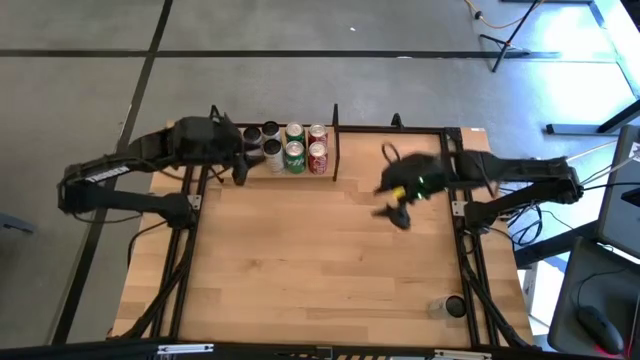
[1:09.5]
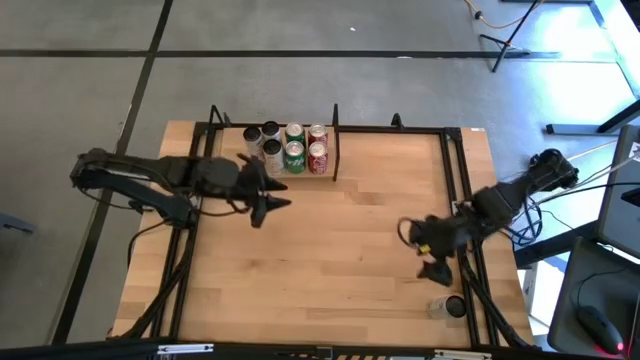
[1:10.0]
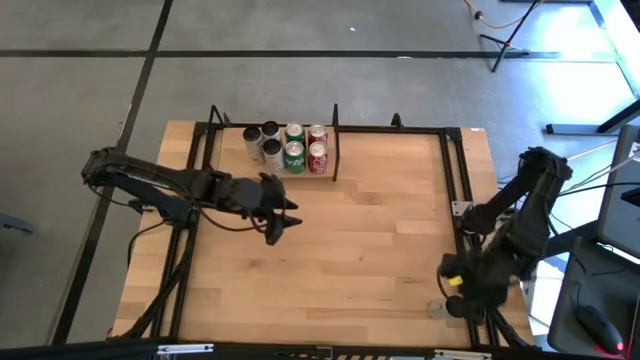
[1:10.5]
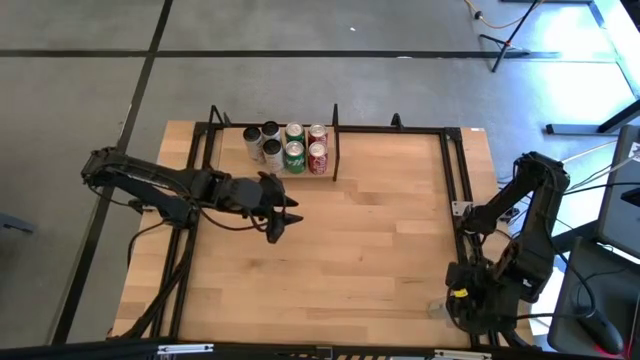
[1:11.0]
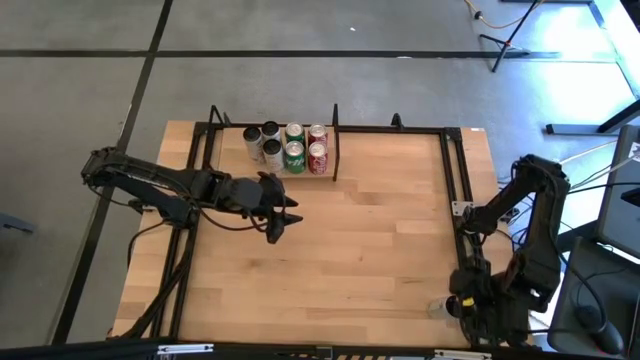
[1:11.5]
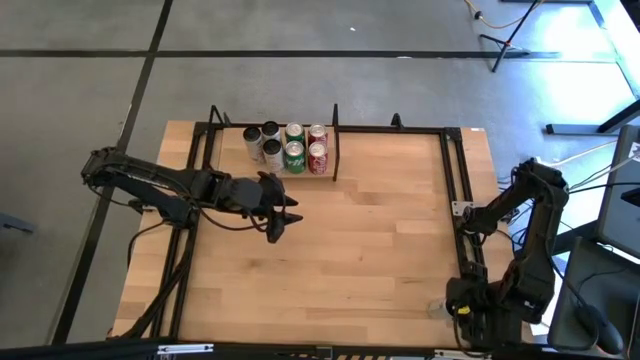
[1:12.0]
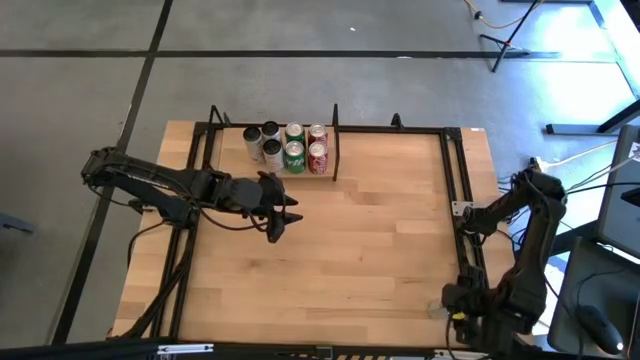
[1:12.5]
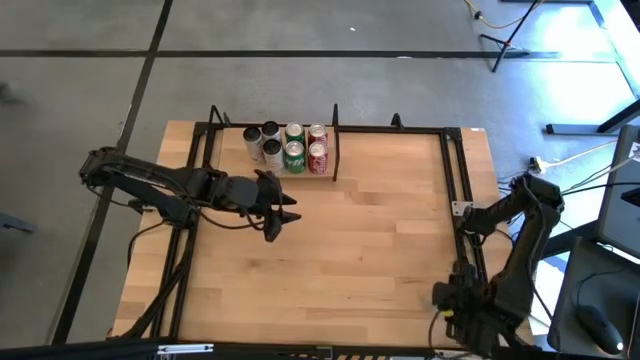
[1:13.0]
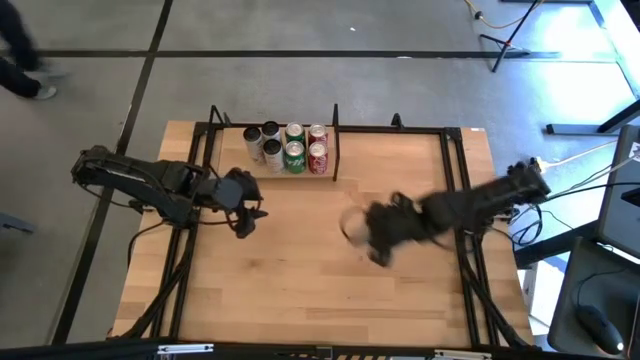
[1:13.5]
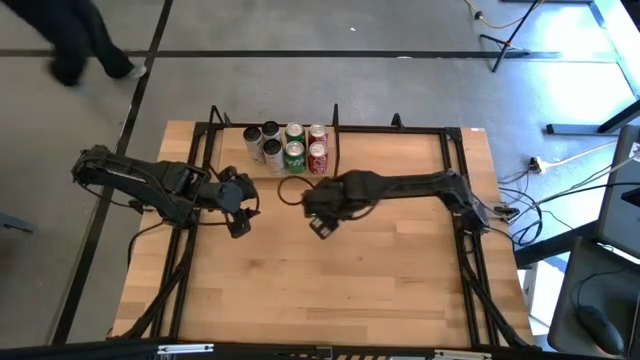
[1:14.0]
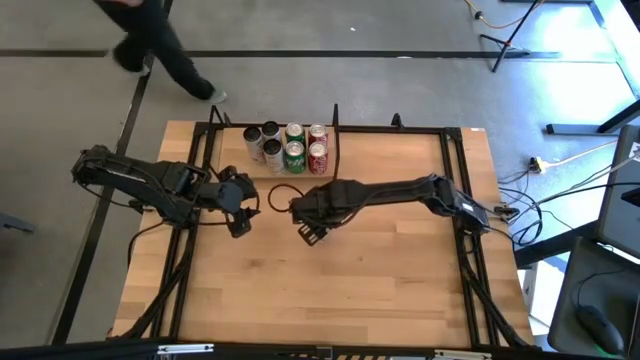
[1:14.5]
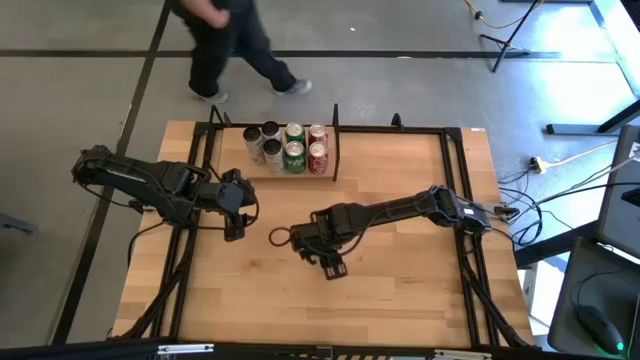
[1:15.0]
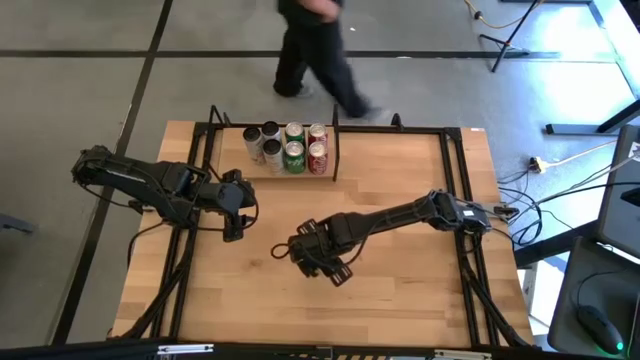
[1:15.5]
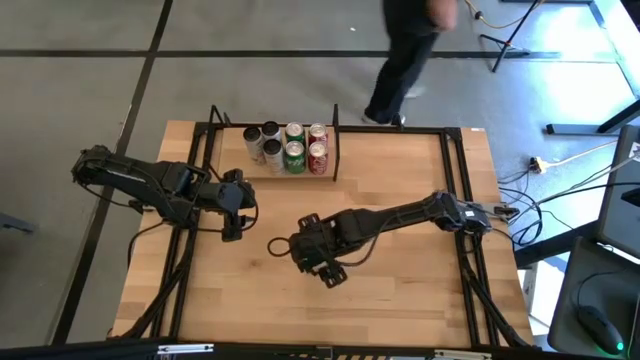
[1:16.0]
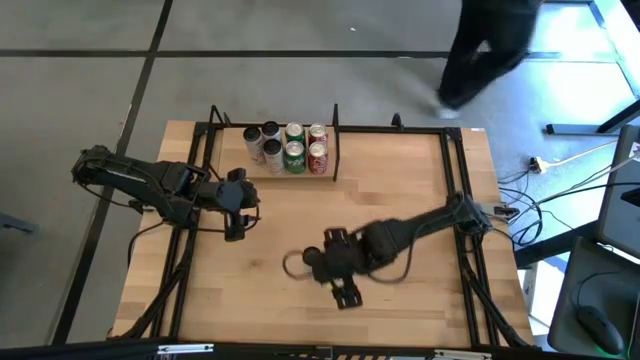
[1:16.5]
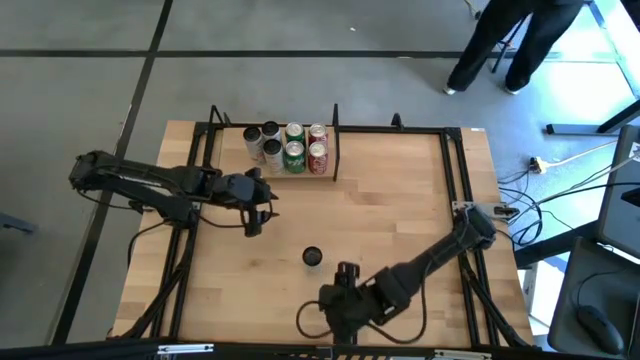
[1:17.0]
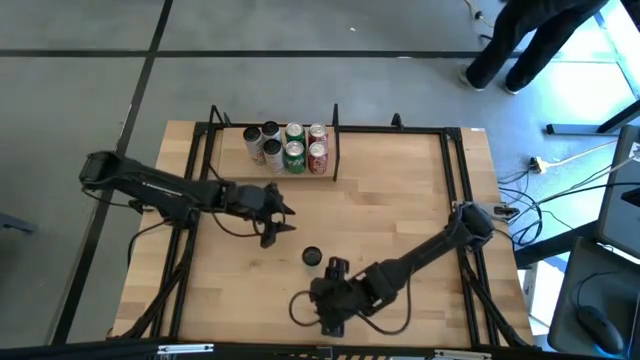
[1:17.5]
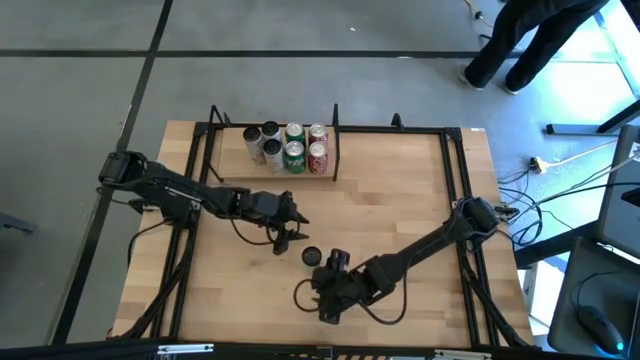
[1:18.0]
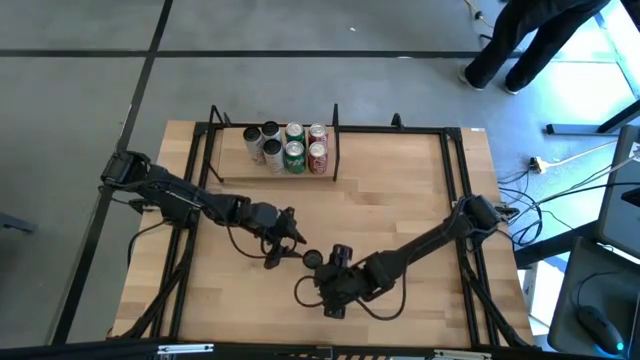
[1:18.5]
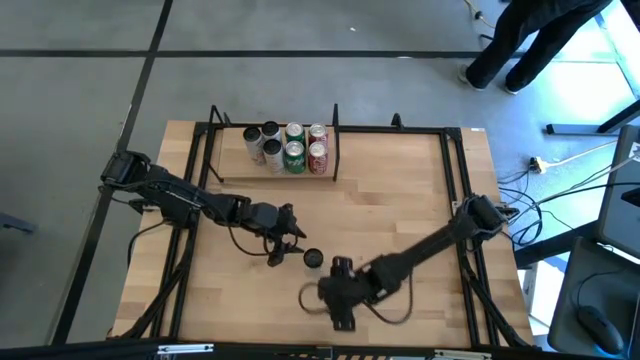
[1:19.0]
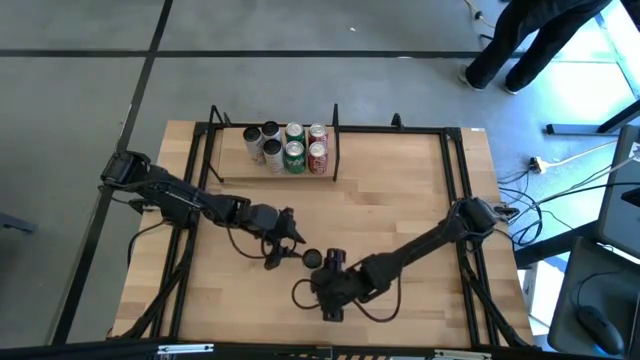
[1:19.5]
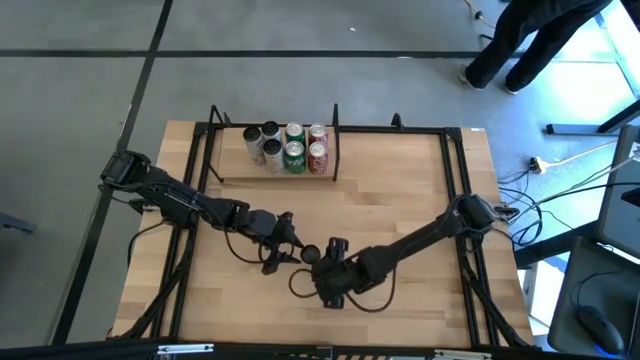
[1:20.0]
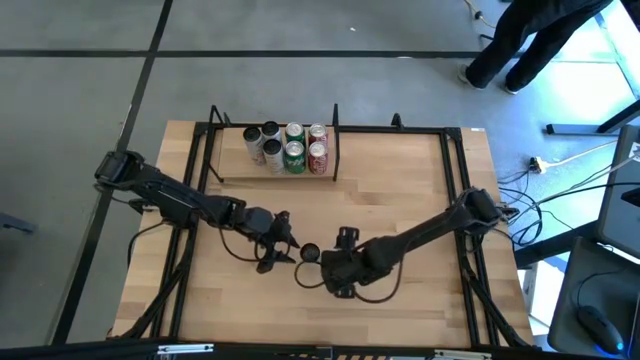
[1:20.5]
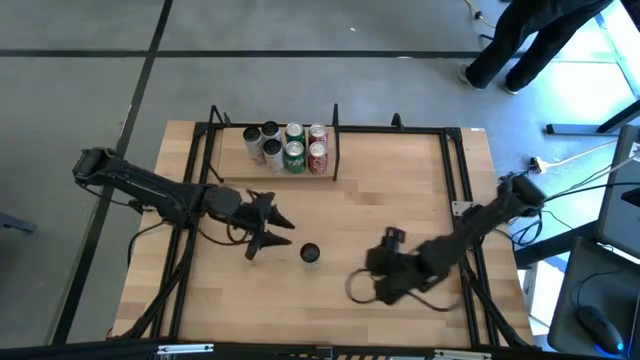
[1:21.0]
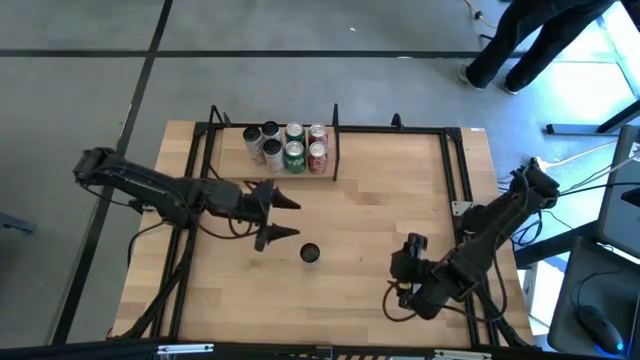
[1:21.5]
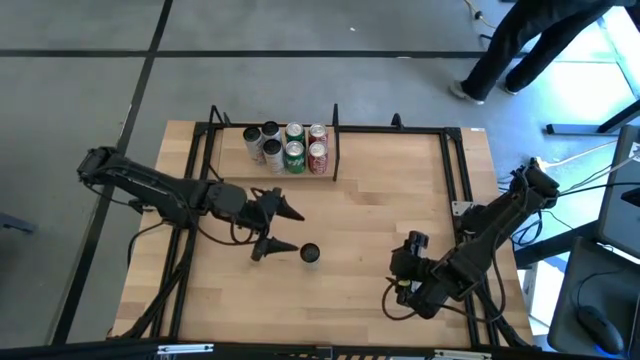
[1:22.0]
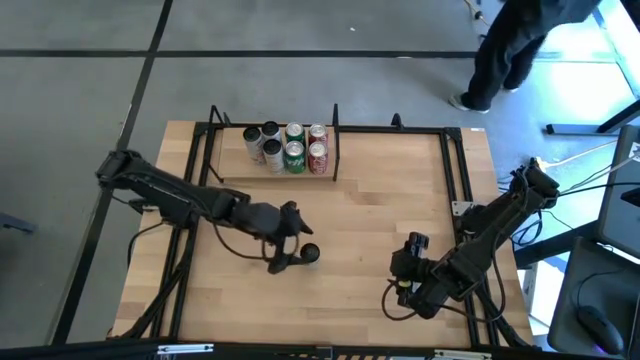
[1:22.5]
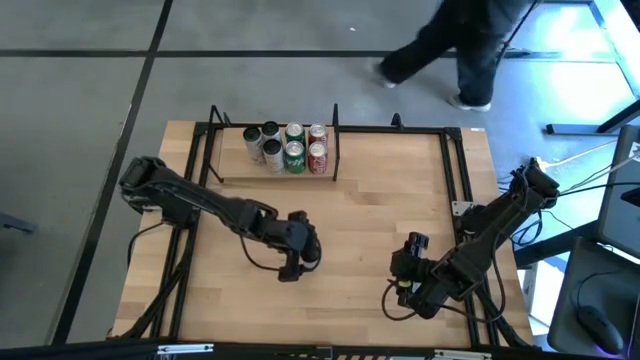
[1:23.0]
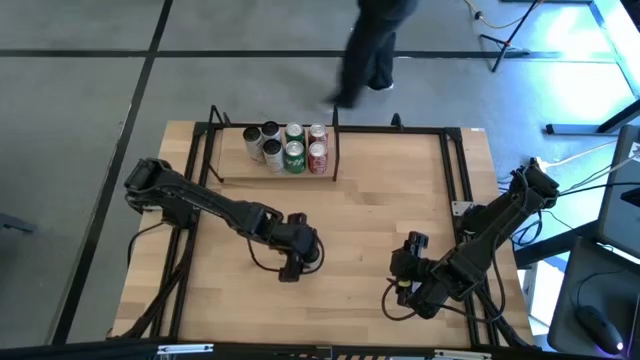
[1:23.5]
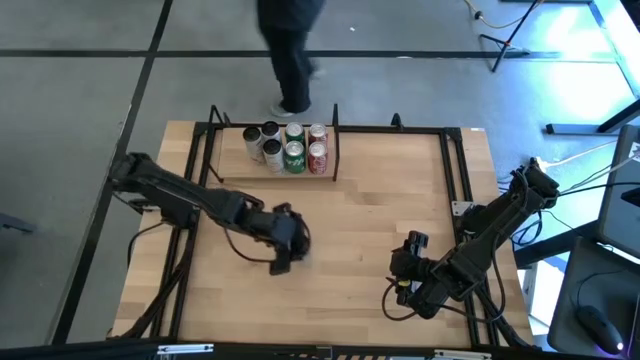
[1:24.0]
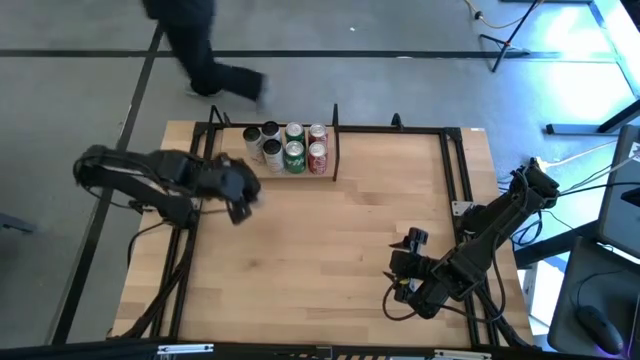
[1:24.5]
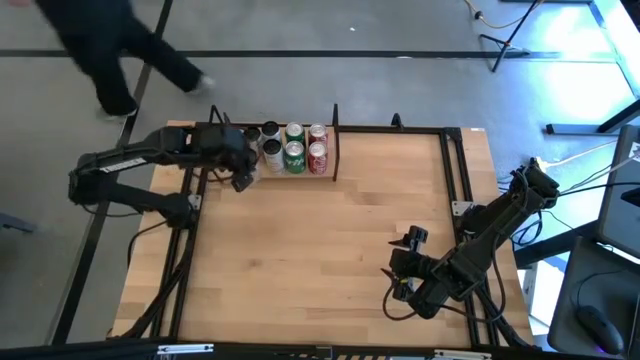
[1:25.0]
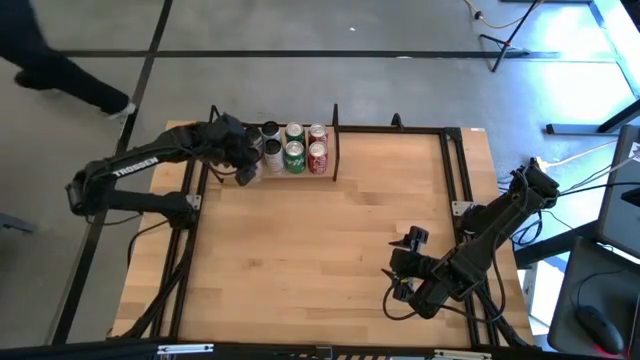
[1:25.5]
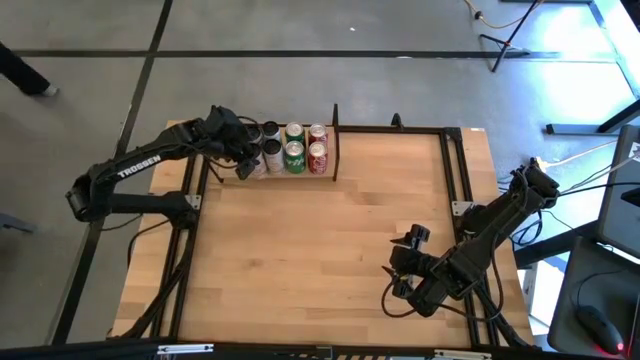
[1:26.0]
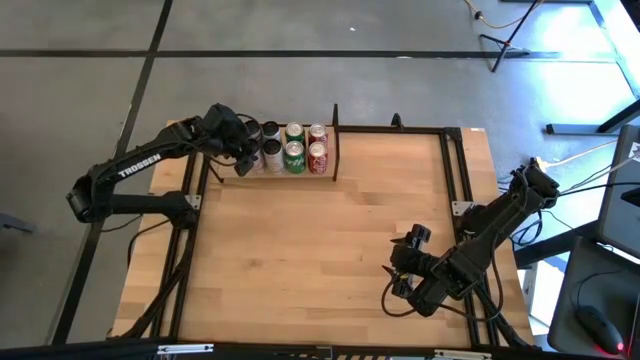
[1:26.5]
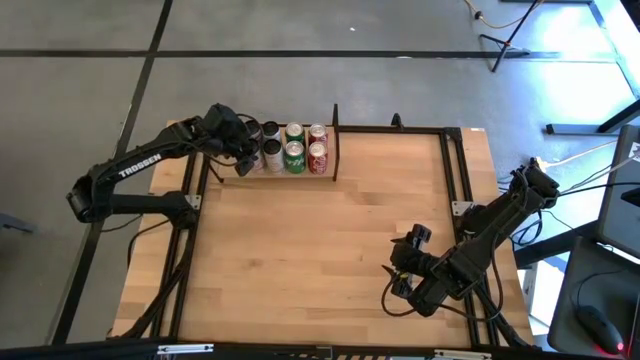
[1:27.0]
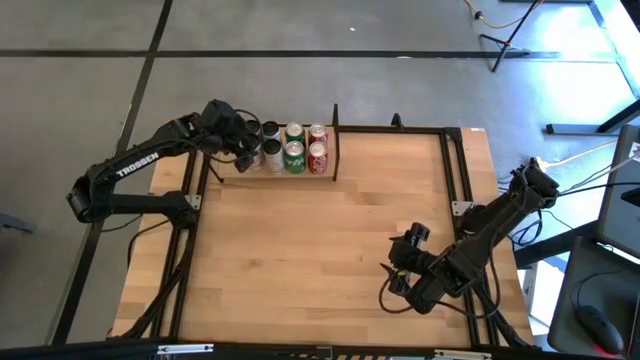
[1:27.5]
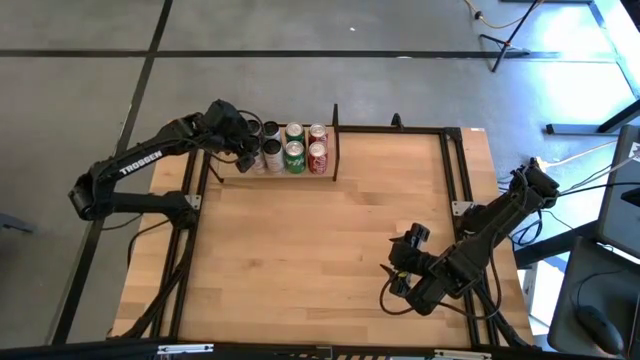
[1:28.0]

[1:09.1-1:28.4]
Task: Place canned beverage on shelf
Put the white-pink soda can on the shelf aligned with the other white-pink soda can

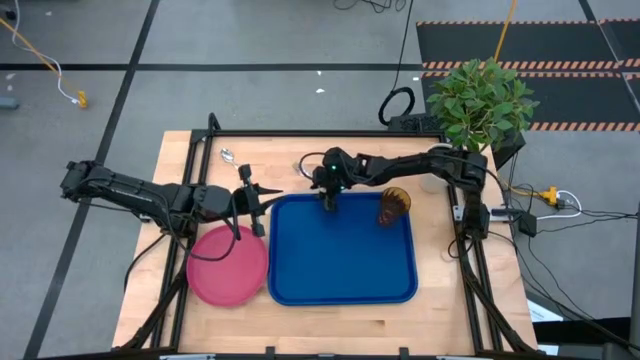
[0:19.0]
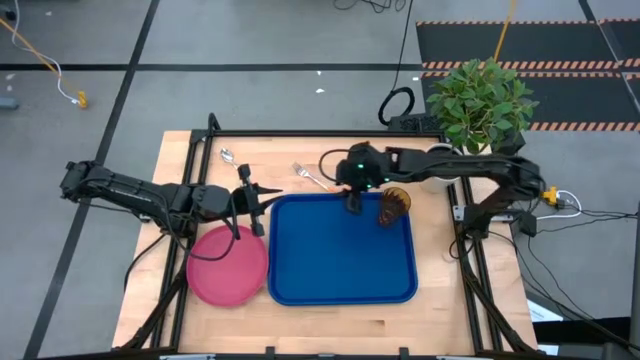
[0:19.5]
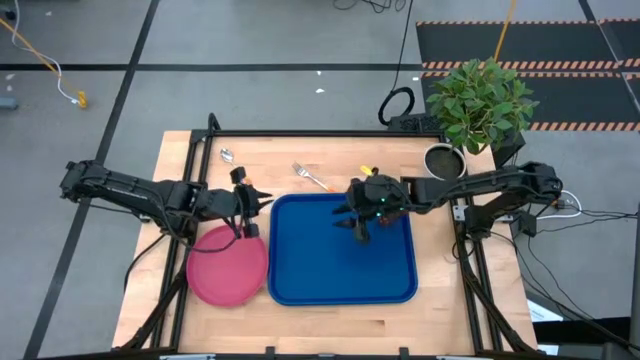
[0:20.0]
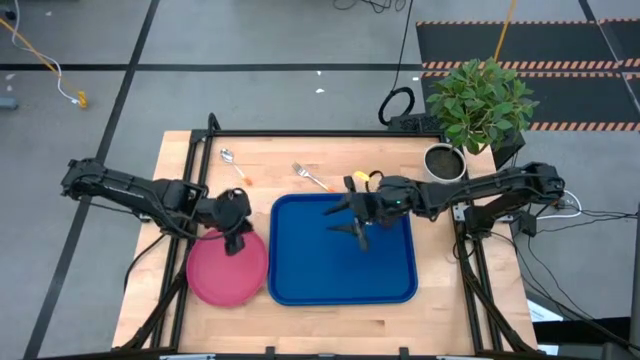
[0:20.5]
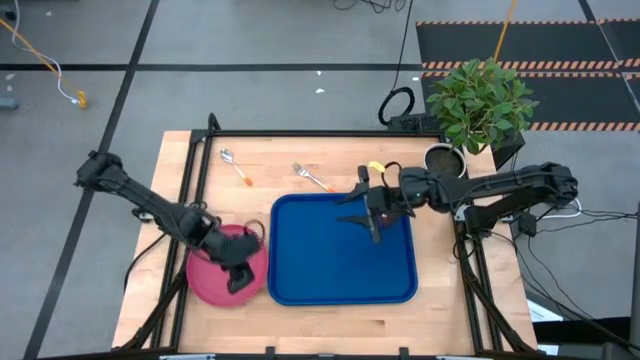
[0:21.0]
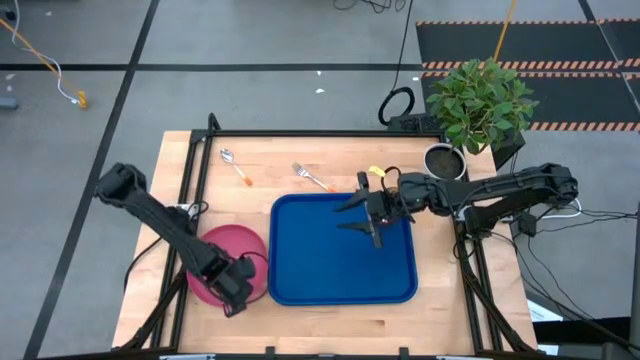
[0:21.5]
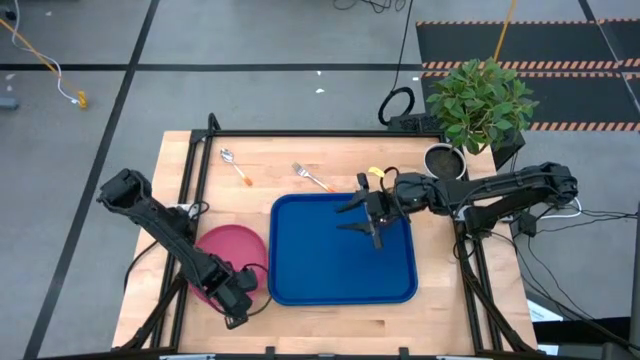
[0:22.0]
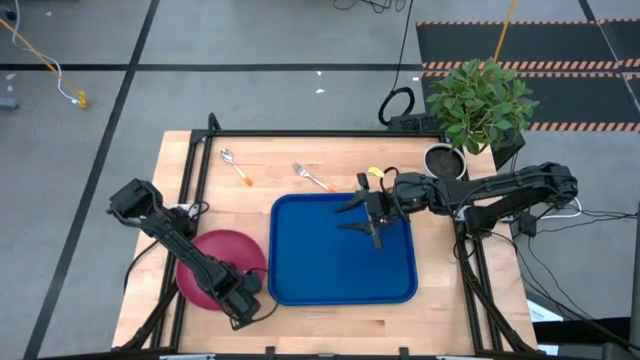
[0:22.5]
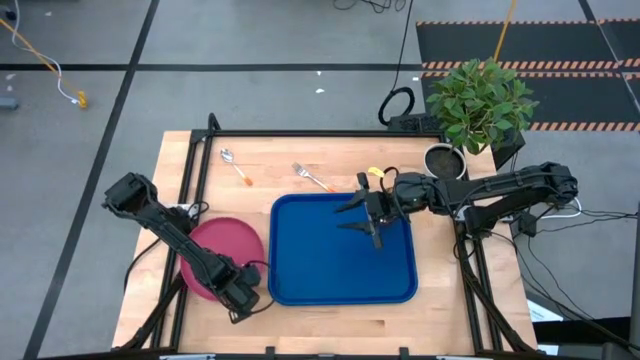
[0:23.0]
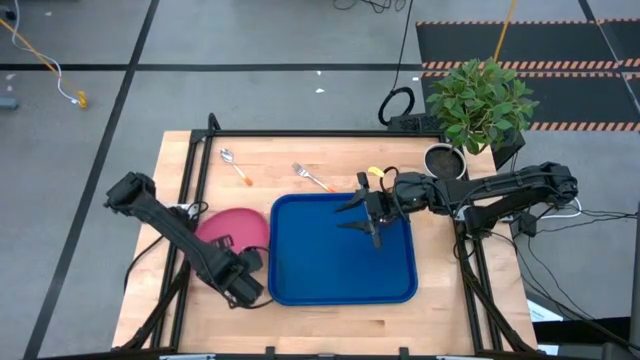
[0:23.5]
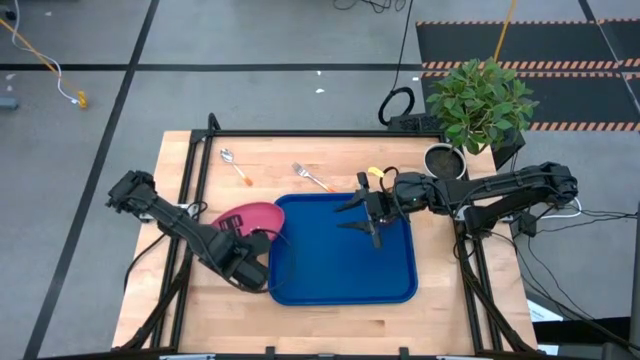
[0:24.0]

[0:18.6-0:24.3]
Task: Pick and place plate/cup/fork/spoon on tray
Put the pink plate on the blue tray to the bottom left of the brown cup
